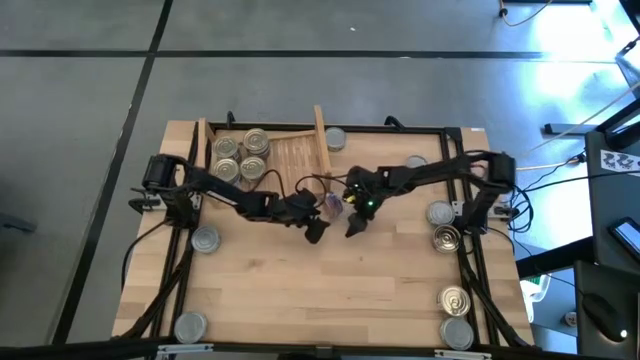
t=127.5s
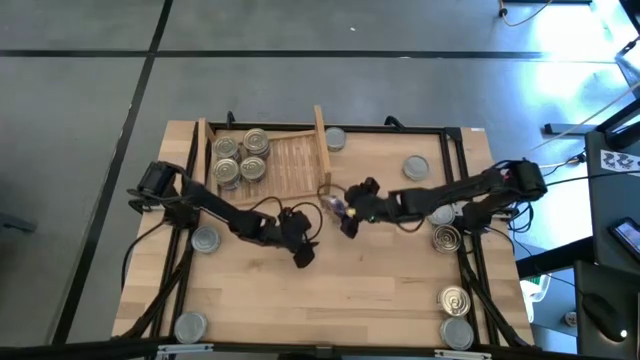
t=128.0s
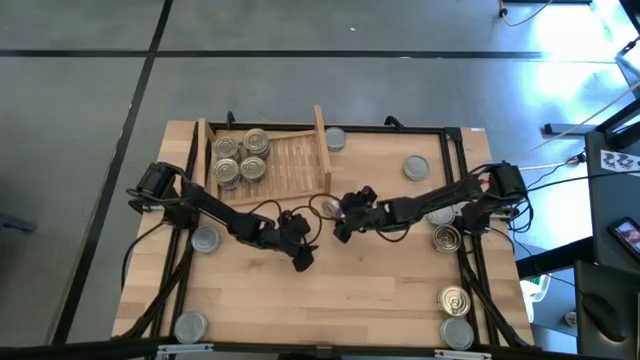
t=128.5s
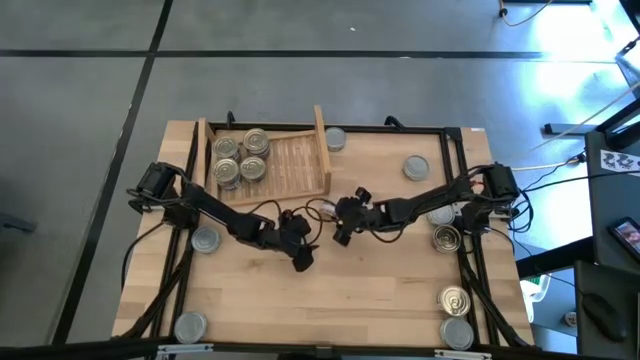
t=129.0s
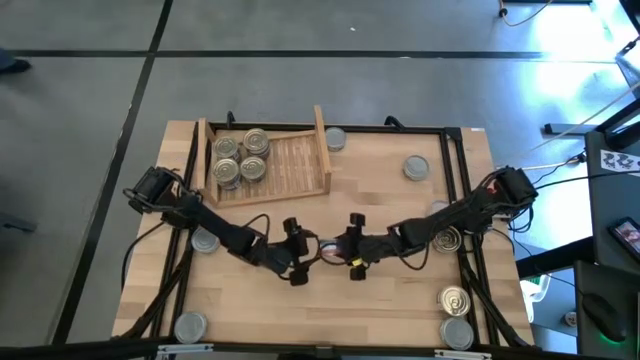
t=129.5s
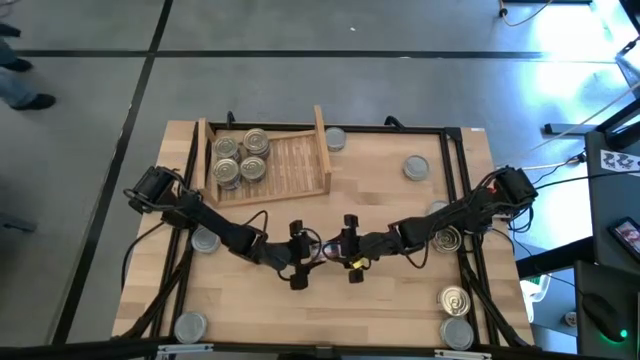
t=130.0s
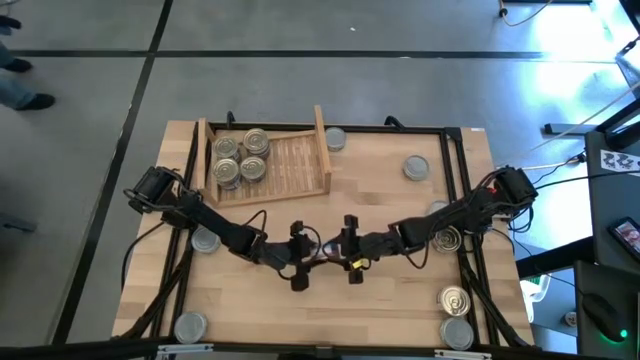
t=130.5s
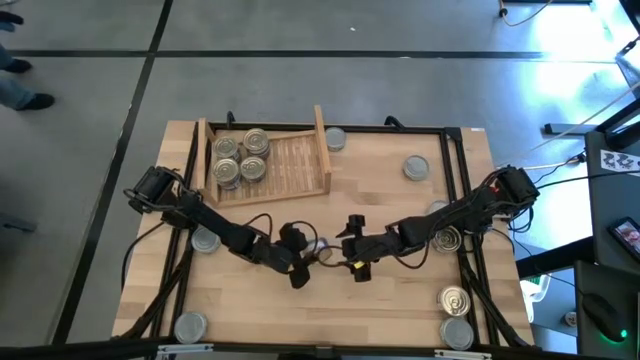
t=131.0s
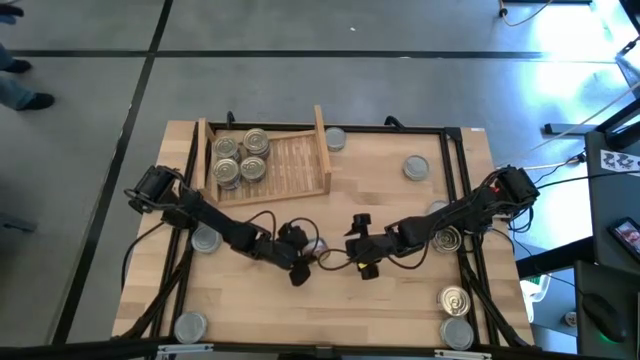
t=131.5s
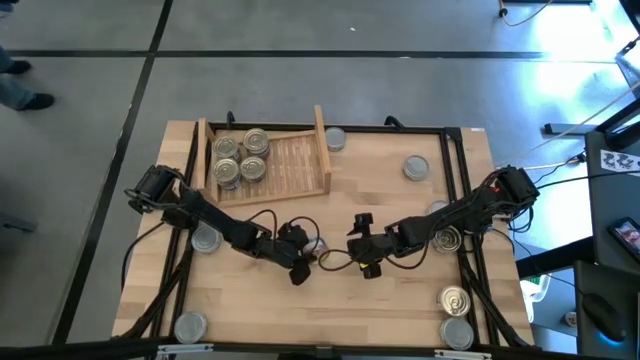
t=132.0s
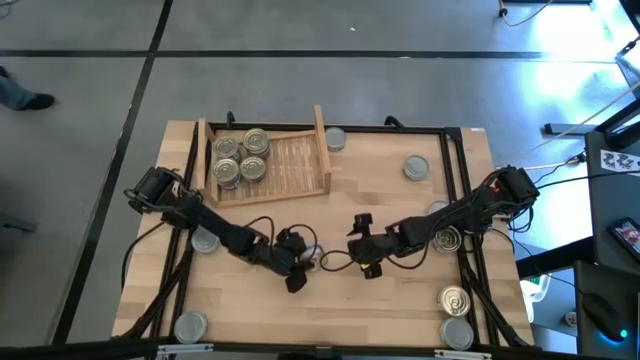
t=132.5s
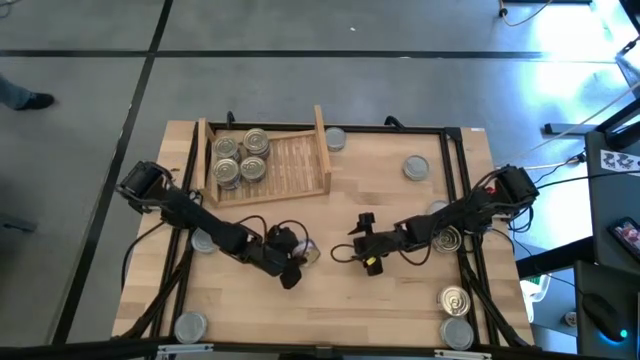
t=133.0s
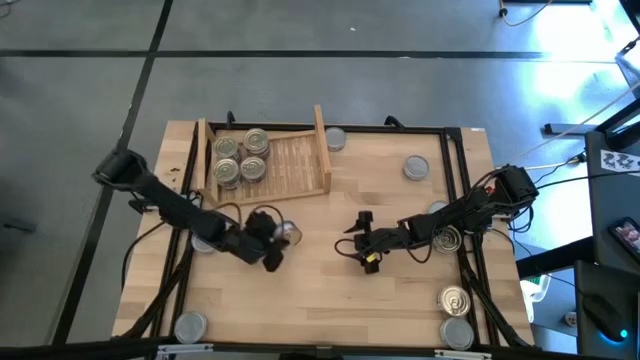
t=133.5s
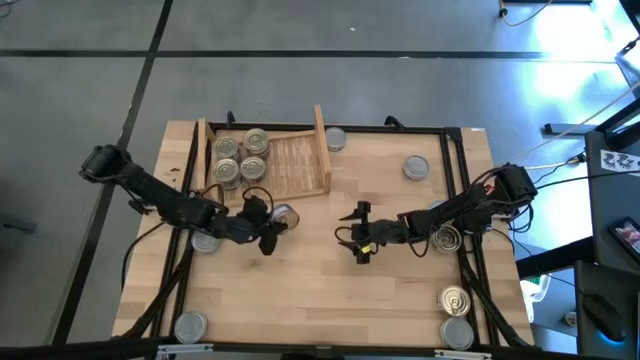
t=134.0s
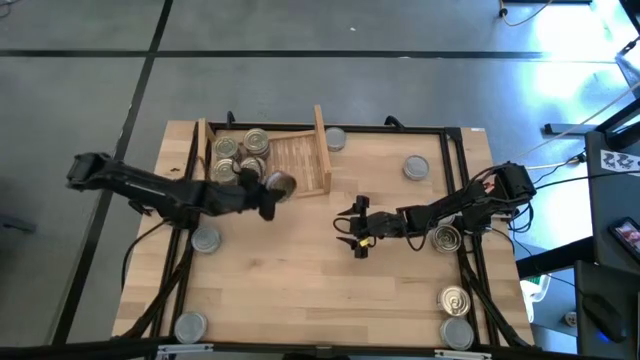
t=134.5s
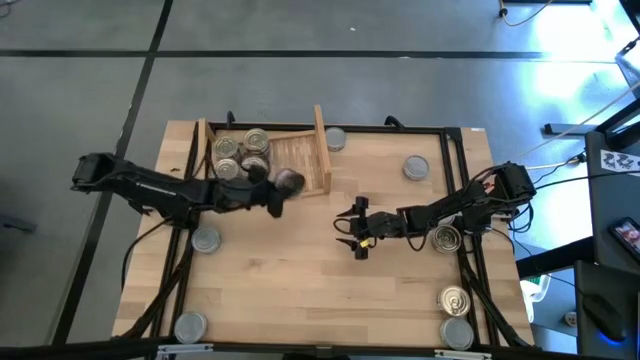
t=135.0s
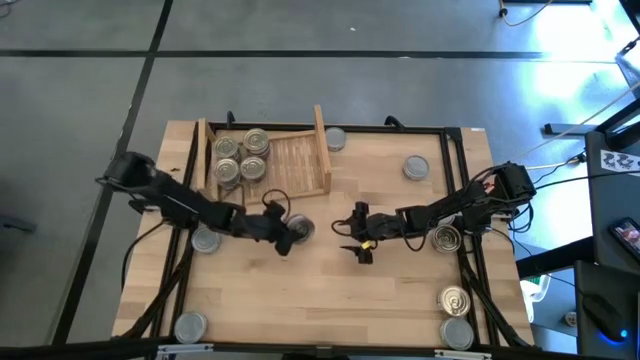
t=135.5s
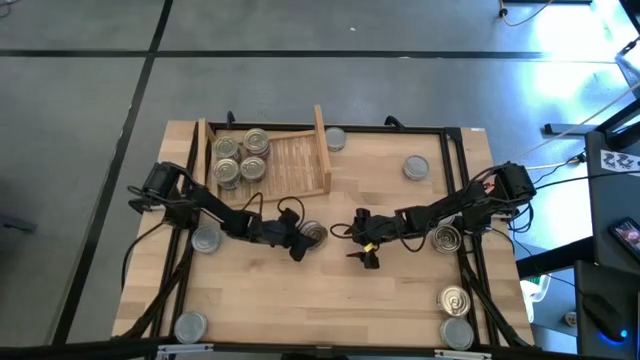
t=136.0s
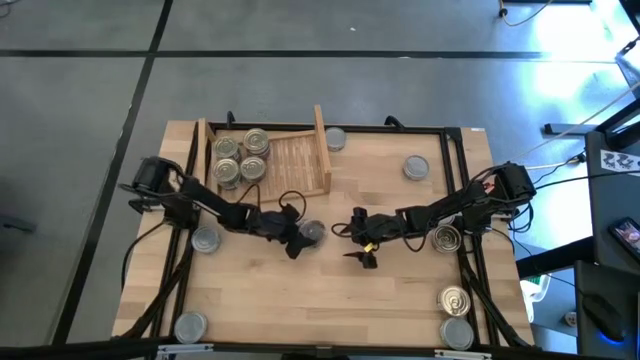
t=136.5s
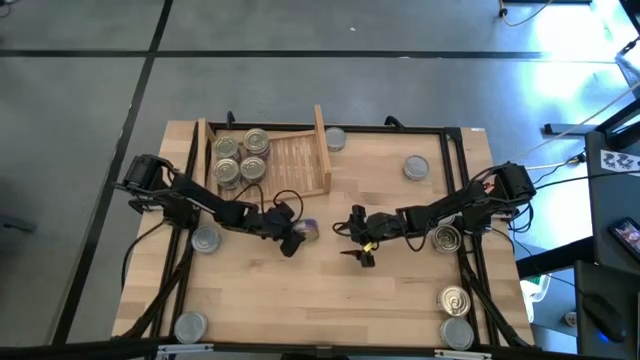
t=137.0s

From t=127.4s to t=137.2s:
Task: Stack canned seafood by type on shelf
Stack the blue tuna can on top of the other blue tuna can on the shelf

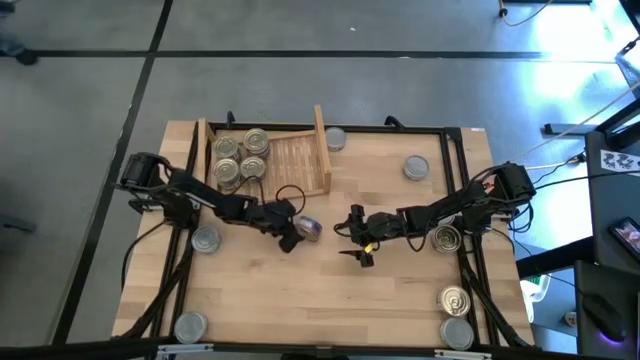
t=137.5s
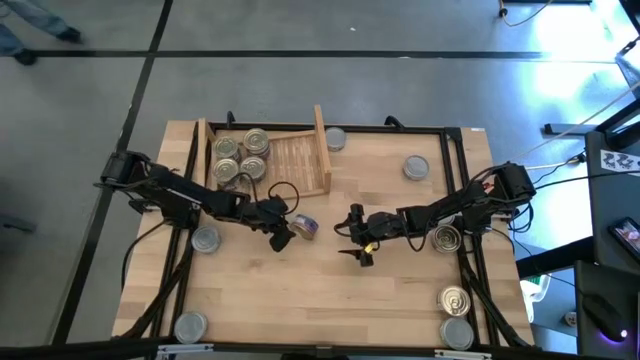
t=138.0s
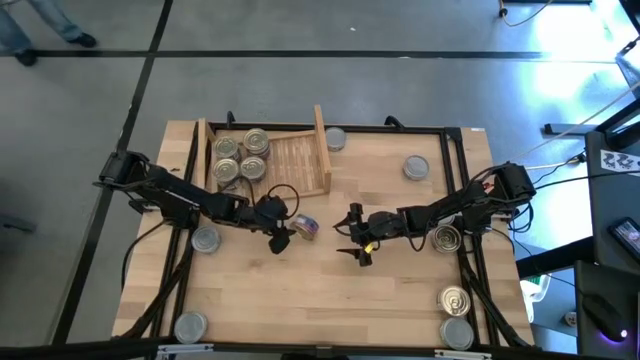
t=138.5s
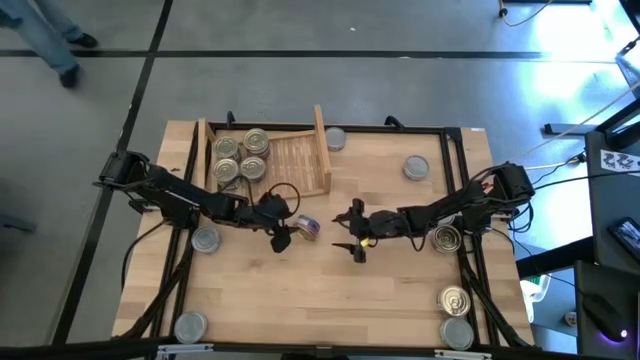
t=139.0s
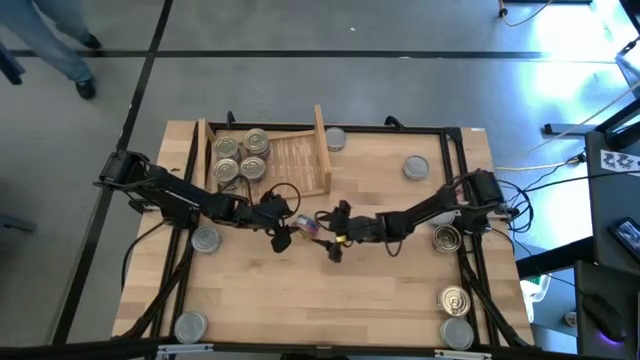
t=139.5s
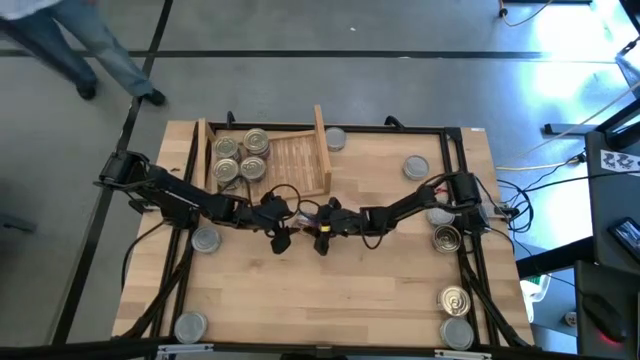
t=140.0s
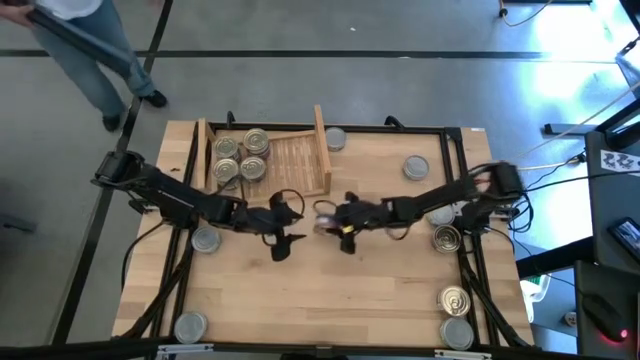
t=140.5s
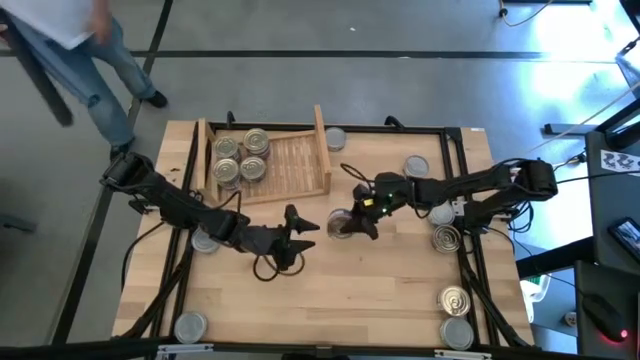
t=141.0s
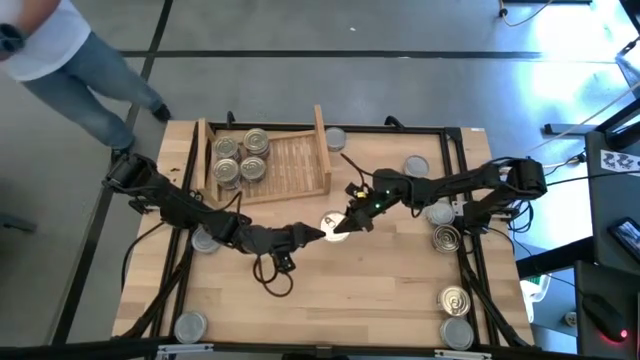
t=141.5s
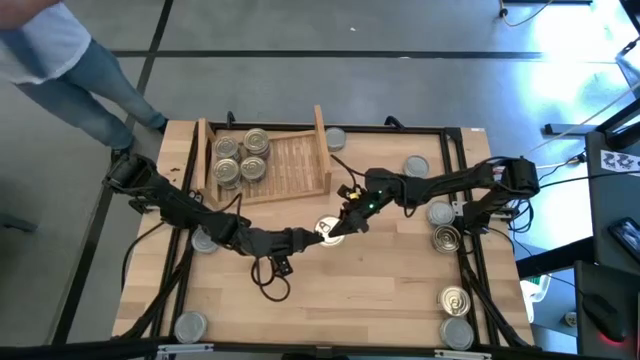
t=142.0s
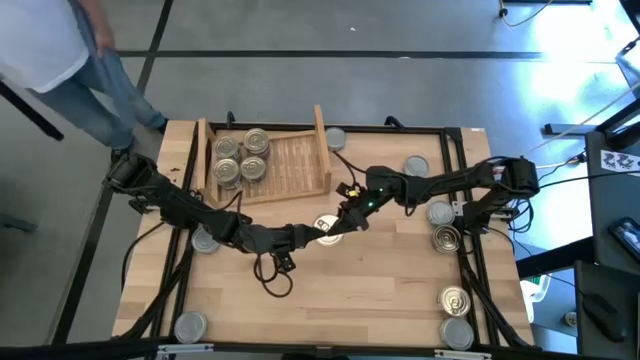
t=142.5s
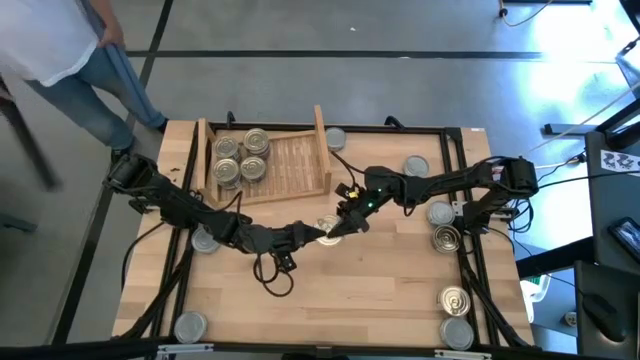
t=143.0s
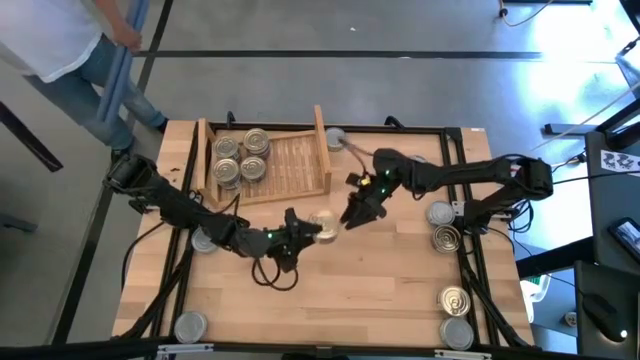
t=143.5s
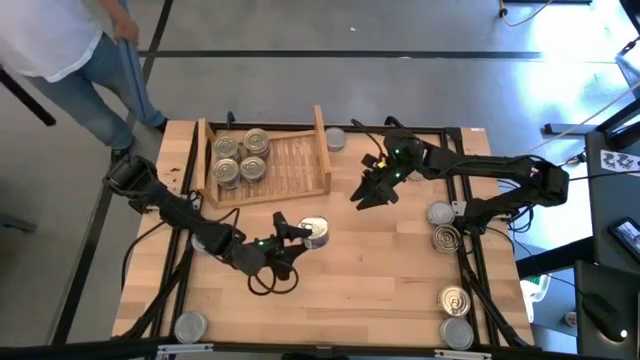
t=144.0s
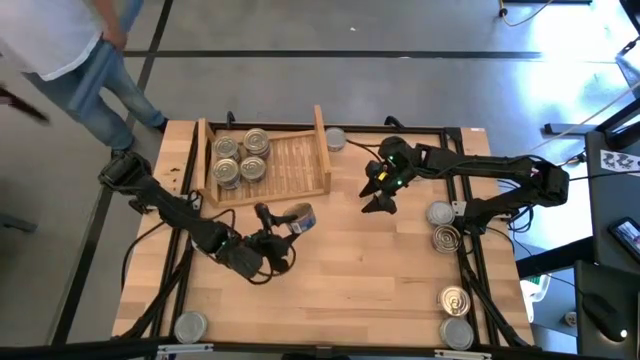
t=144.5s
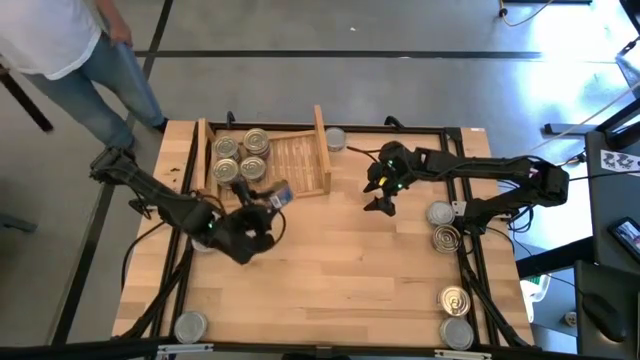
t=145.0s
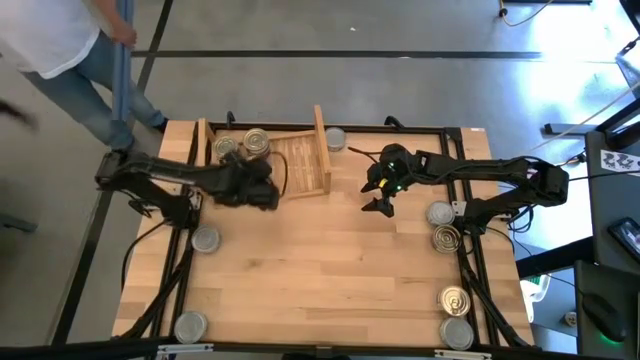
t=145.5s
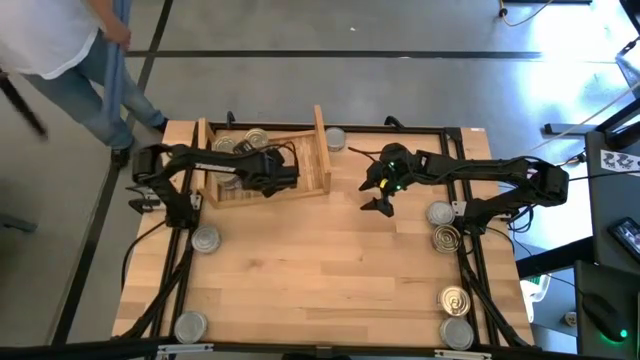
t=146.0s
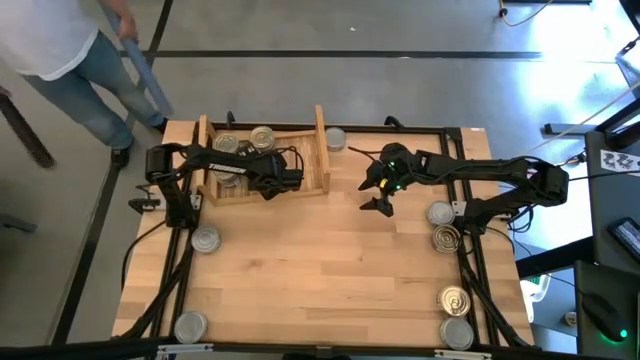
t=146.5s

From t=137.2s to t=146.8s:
Stack the blue tuna can on top of the other blue tuna can

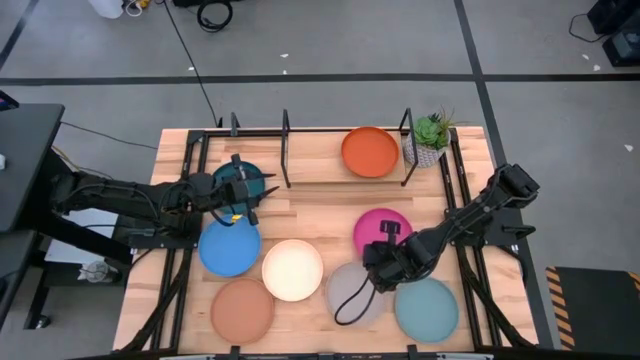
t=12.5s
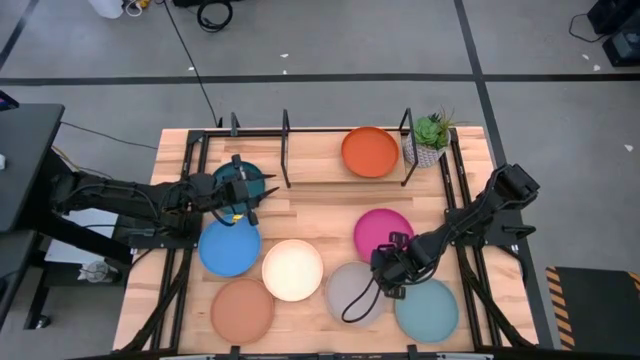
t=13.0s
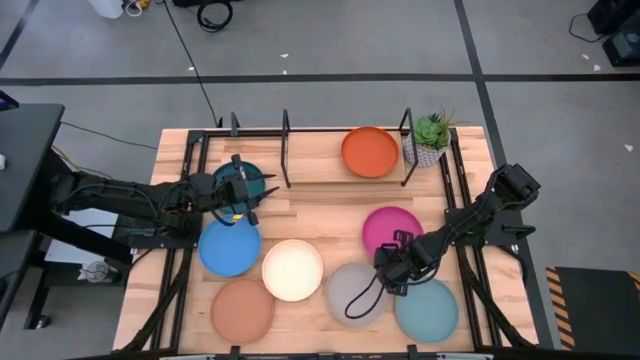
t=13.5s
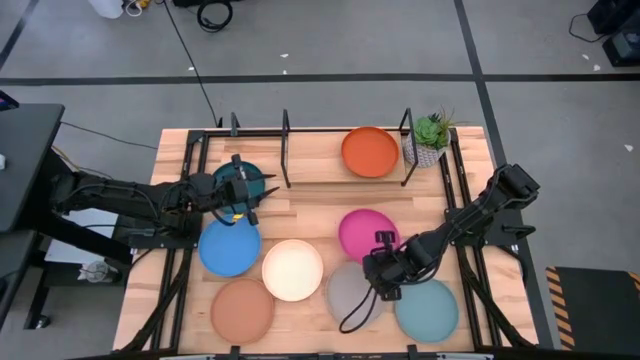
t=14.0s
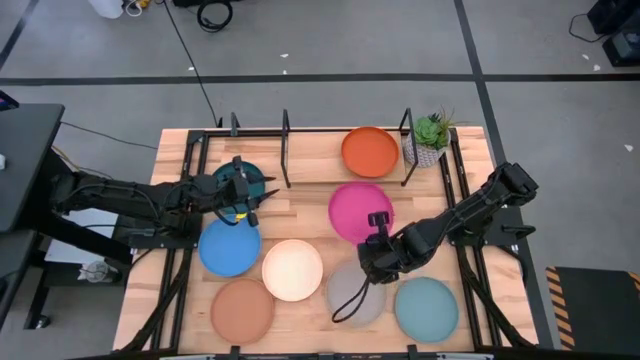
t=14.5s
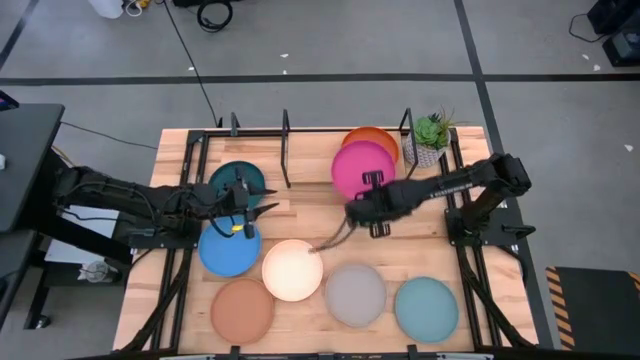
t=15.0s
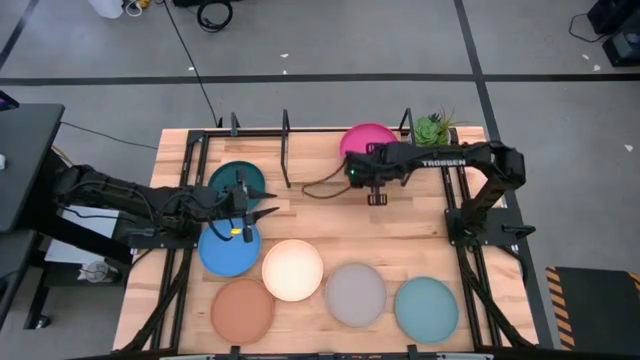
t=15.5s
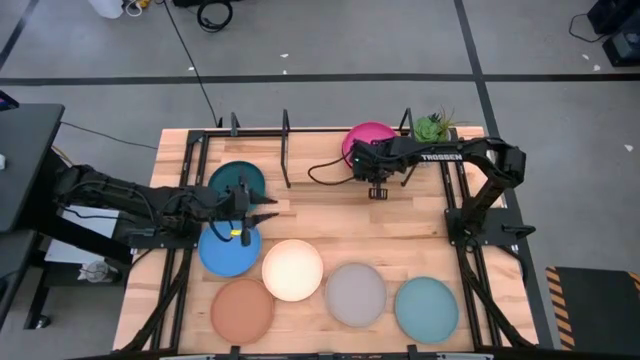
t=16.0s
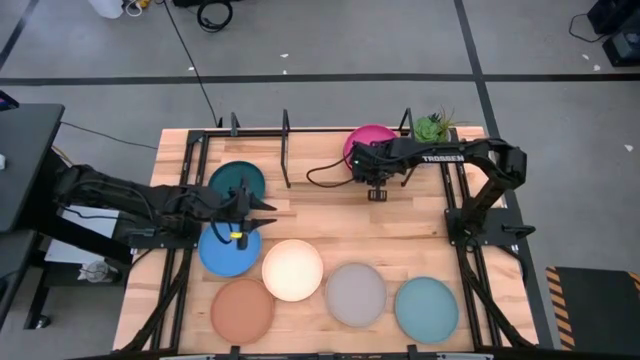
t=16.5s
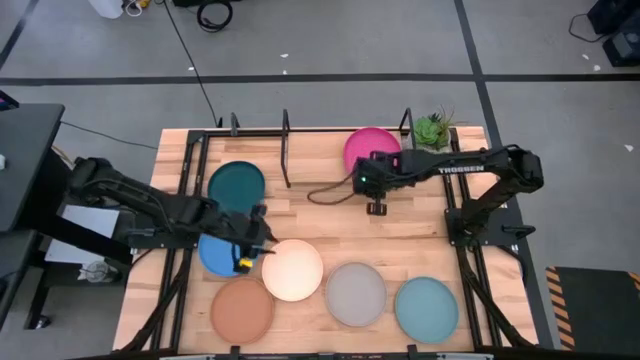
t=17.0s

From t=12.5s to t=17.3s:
Task: Place and stack plates onto a shelf
Stack the pink plate on the orange plate on the shelf
